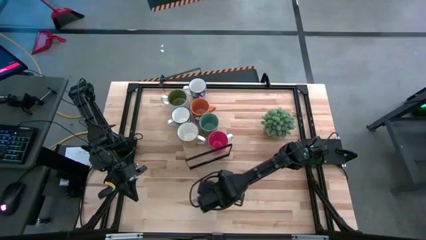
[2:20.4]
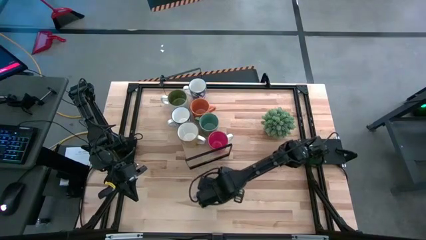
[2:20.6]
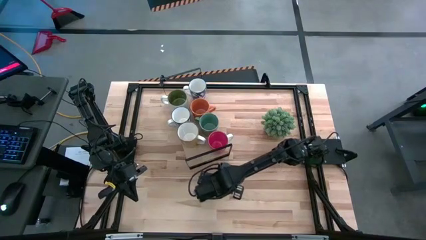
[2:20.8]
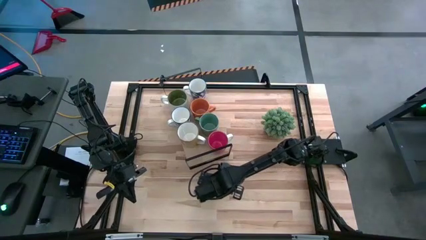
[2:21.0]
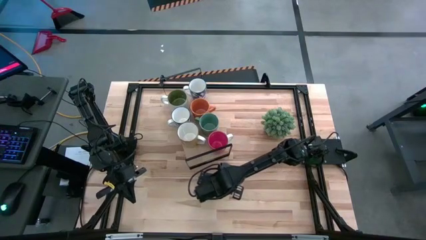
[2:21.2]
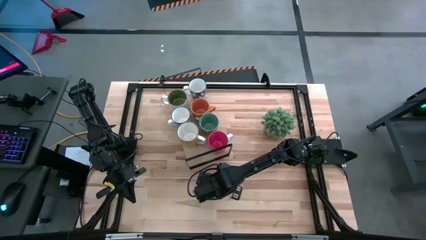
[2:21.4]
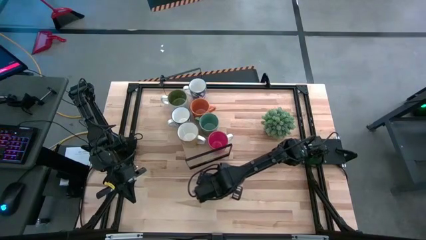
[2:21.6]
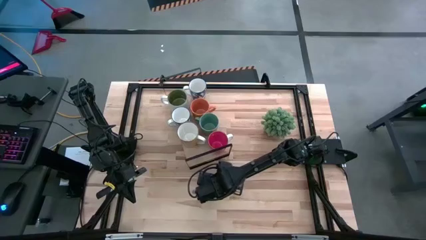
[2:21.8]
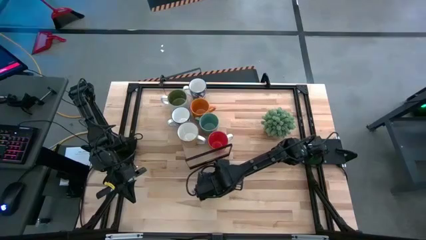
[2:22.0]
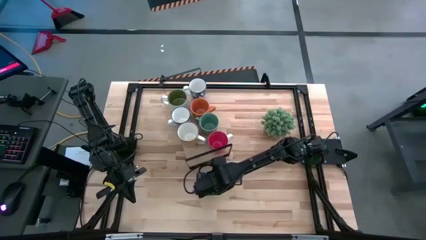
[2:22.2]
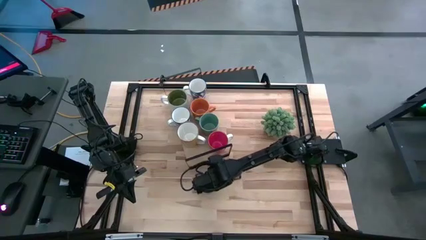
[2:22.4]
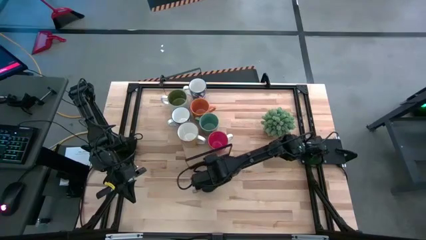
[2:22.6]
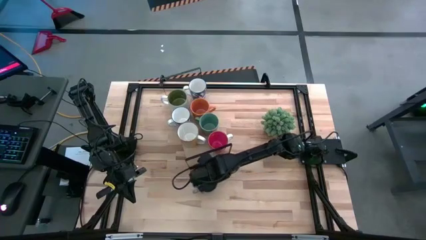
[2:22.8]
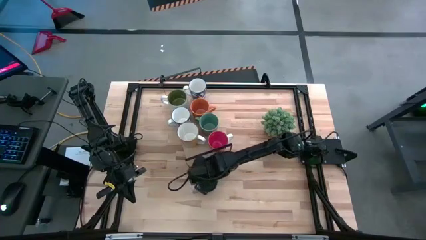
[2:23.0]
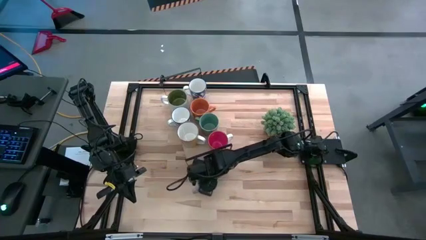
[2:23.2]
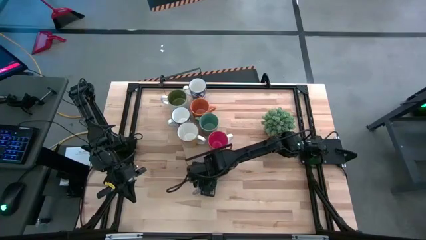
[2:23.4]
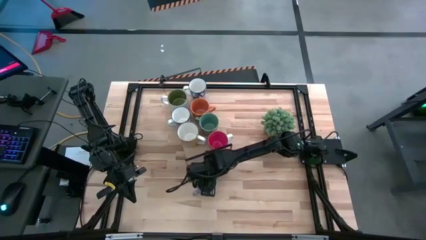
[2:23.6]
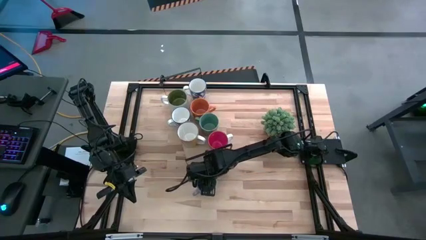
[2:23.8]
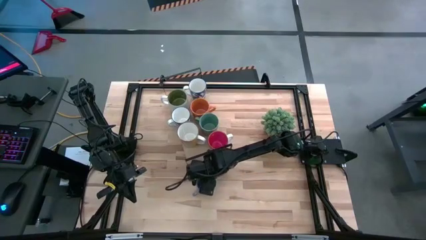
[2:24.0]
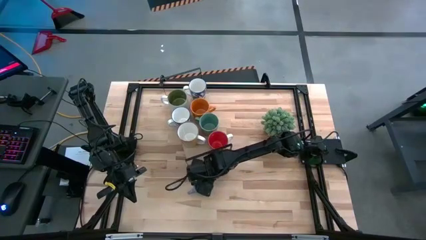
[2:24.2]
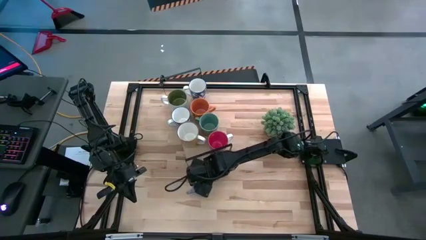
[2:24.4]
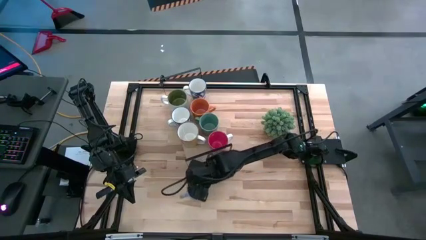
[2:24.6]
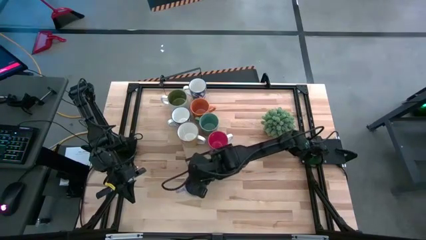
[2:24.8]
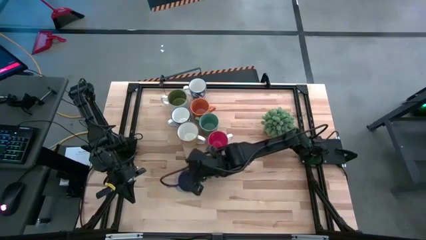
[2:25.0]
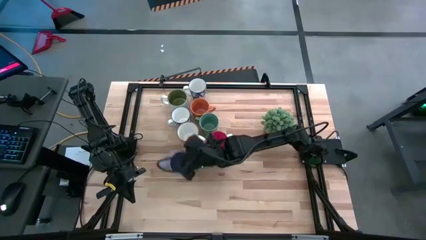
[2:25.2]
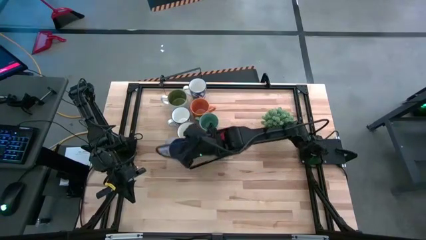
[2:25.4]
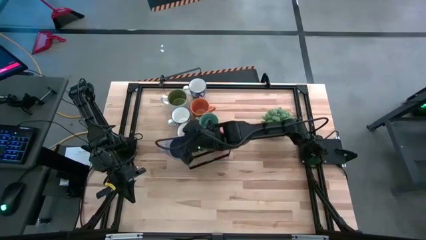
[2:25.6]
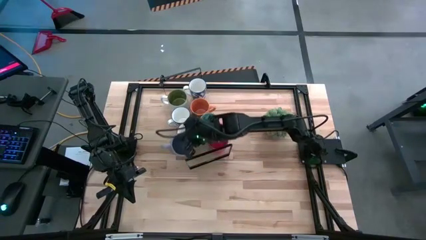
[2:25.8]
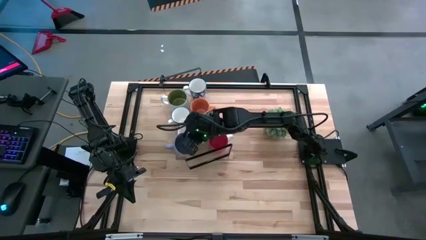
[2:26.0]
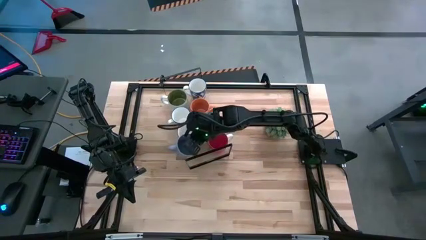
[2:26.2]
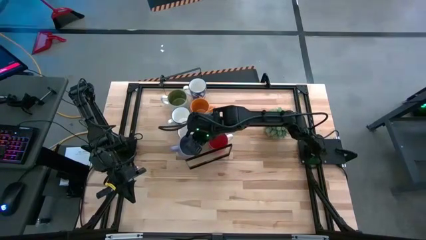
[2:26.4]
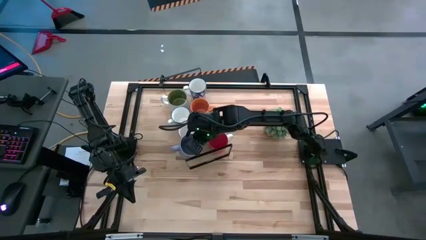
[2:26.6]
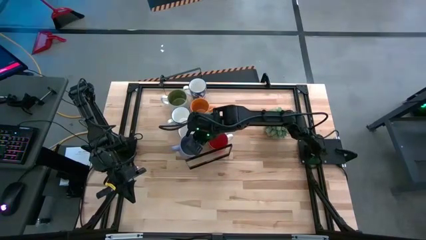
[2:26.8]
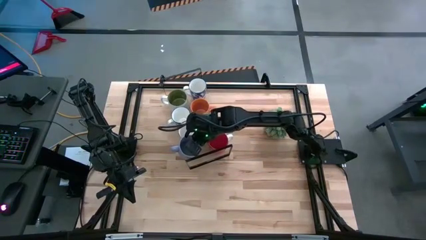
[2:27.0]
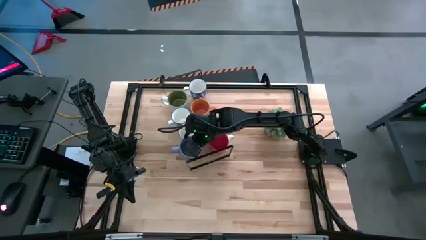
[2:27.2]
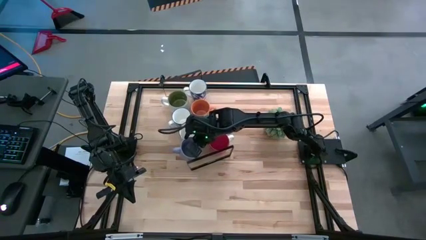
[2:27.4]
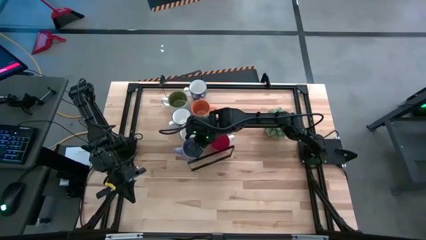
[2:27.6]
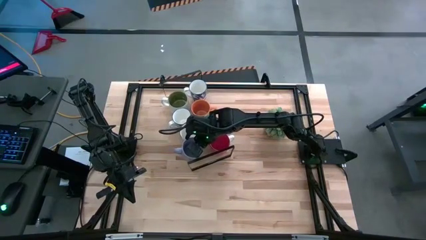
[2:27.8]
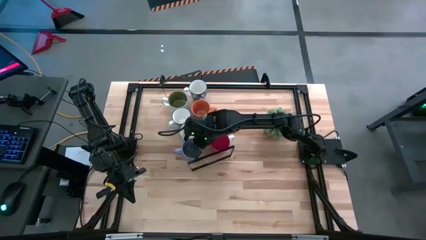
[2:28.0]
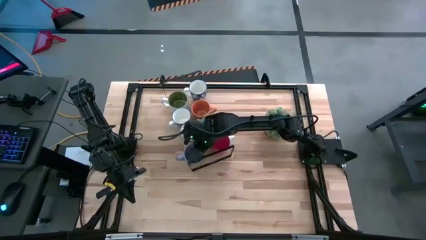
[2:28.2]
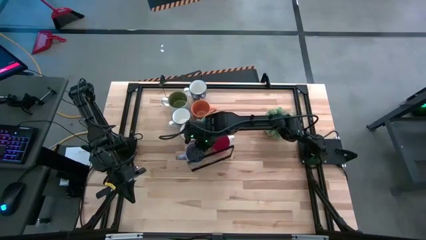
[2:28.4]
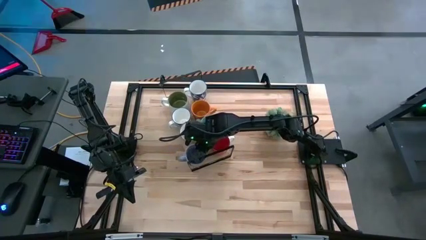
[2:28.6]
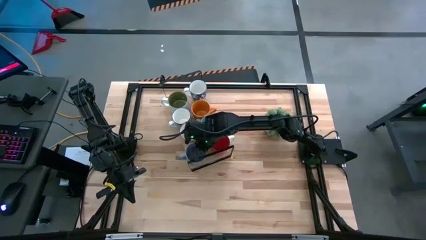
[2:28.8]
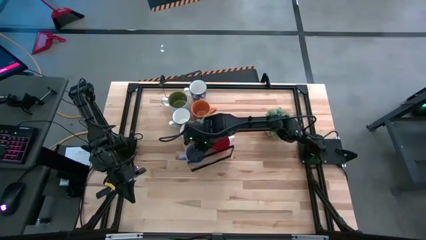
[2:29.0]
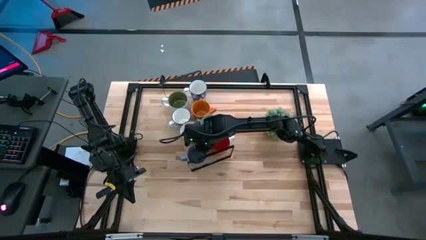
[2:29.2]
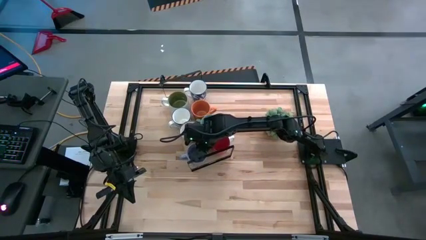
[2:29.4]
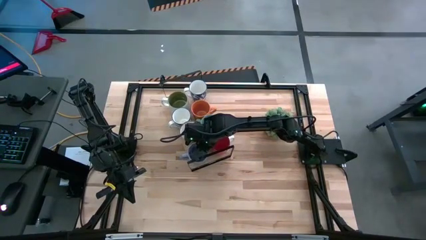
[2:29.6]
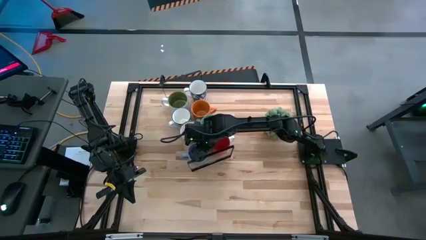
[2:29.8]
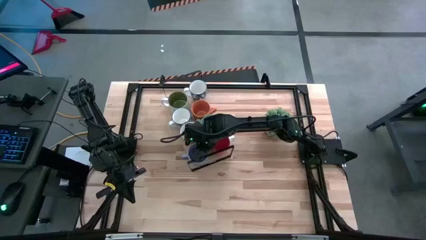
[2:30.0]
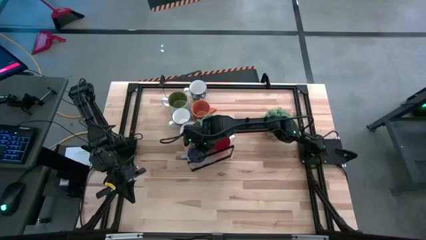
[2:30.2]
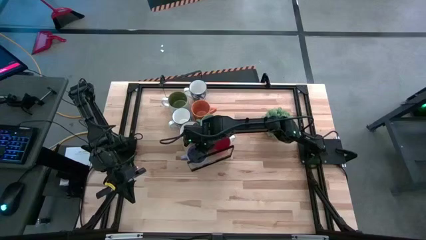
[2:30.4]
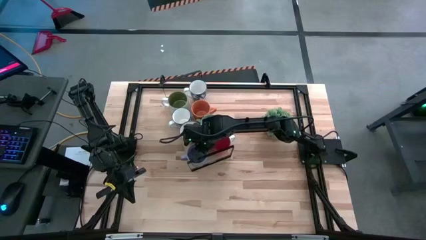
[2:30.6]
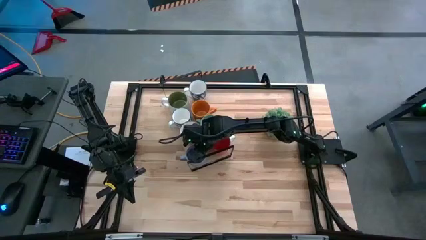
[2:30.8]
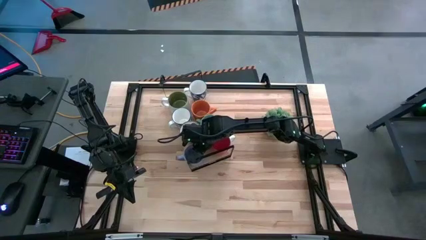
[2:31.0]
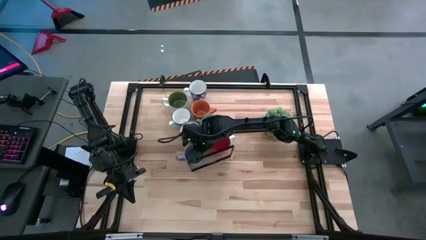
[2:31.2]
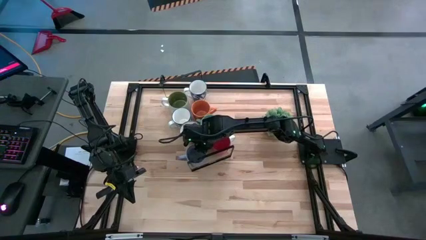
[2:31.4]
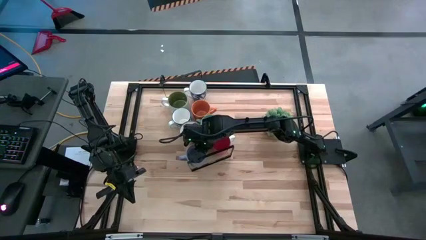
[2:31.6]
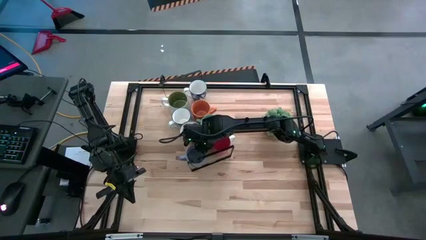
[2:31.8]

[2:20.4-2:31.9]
Task: Place coffee mugs
Put the blue mug on the shelf
